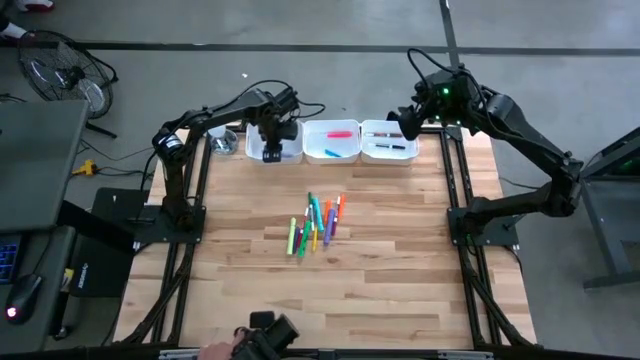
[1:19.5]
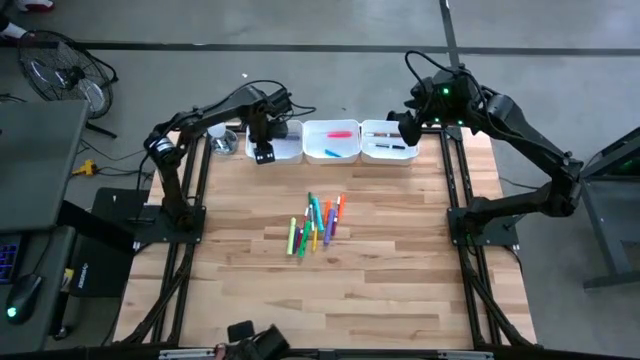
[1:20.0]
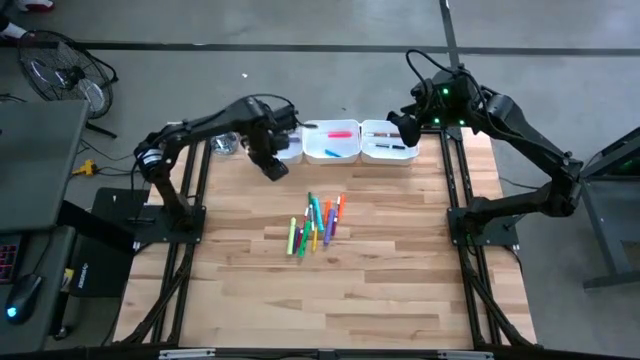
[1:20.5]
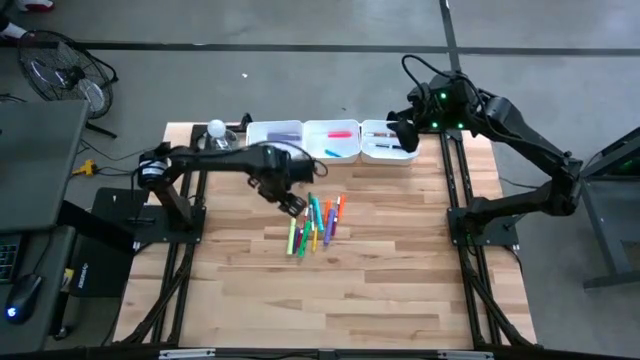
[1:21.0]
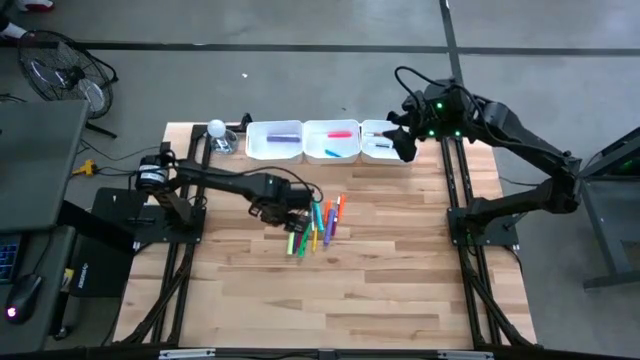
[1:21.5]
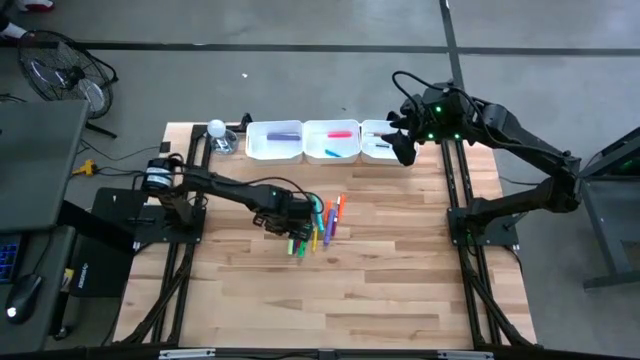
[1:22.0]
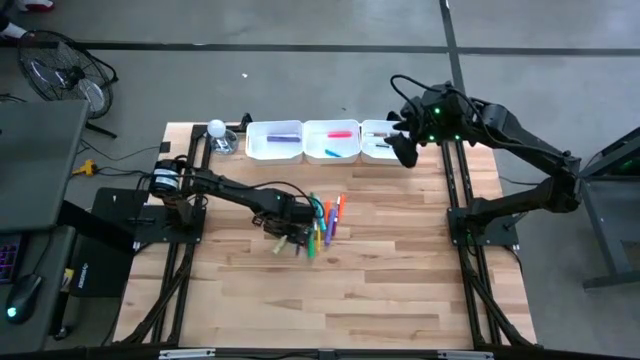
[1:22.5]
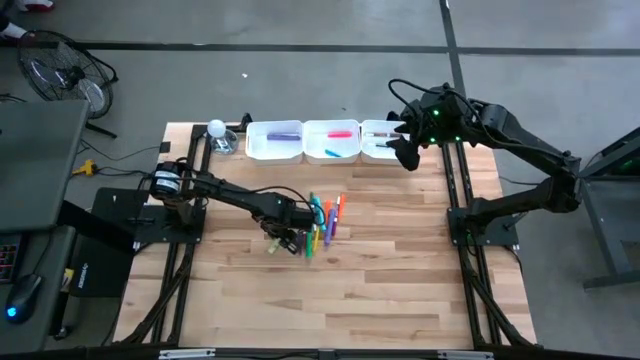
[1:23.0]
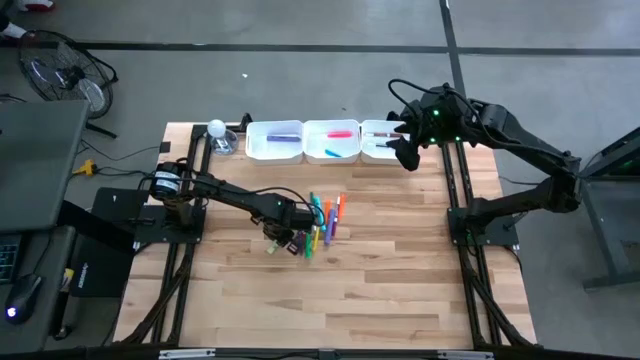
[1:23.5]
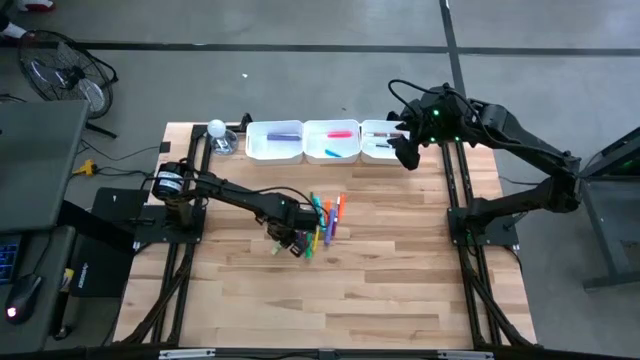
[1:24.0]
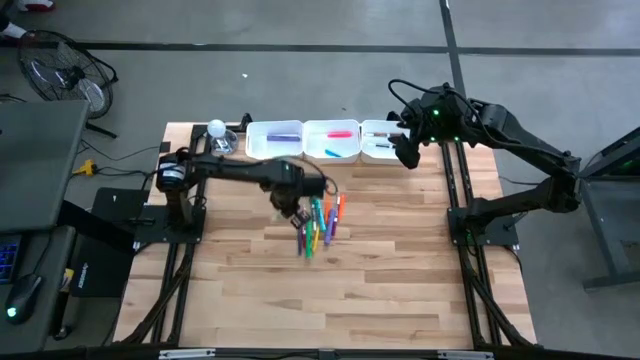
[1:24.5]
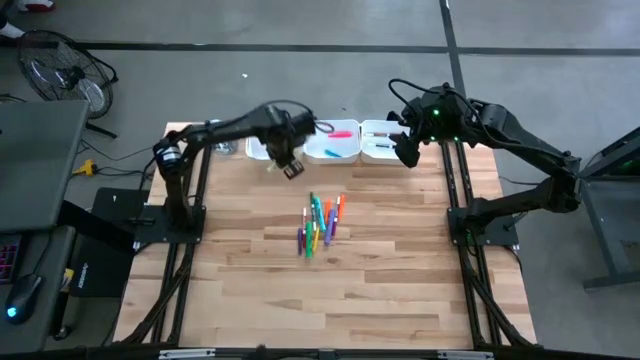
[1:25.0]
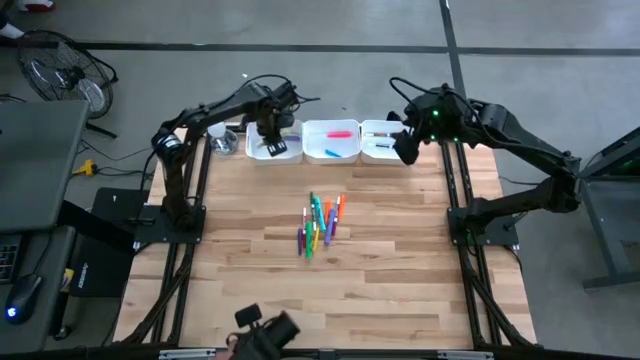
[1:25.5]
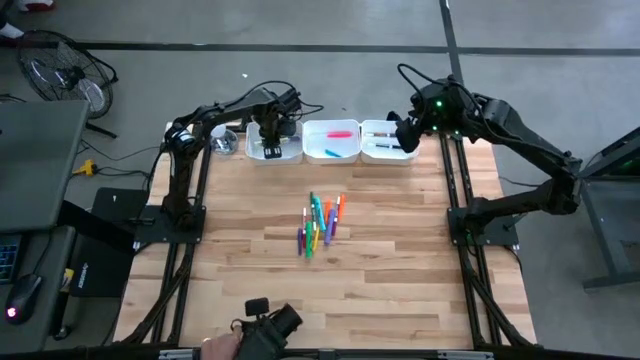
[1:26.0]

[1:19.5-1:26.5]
Task: Pick & Place Markers
Put the light green highlighter pen into the left white bin

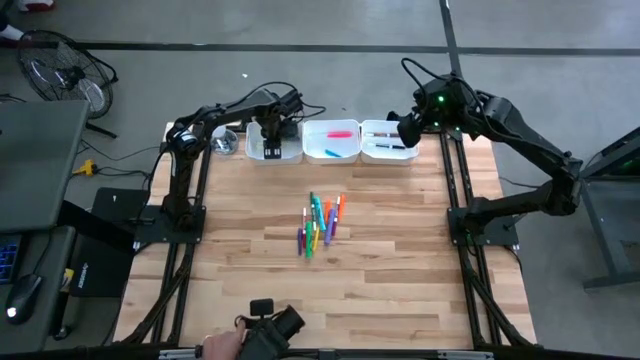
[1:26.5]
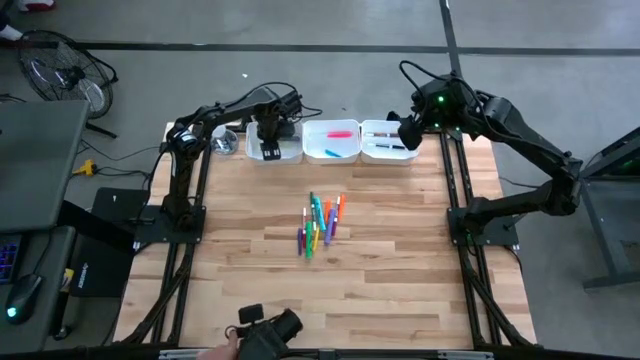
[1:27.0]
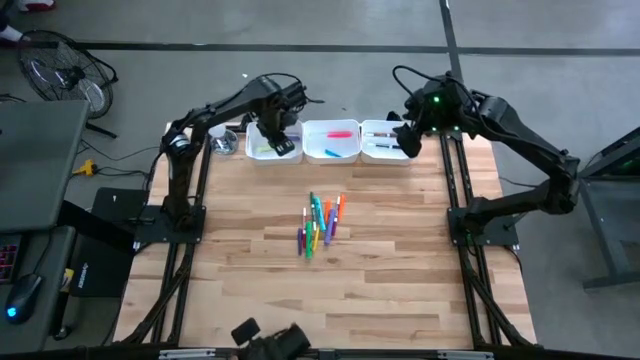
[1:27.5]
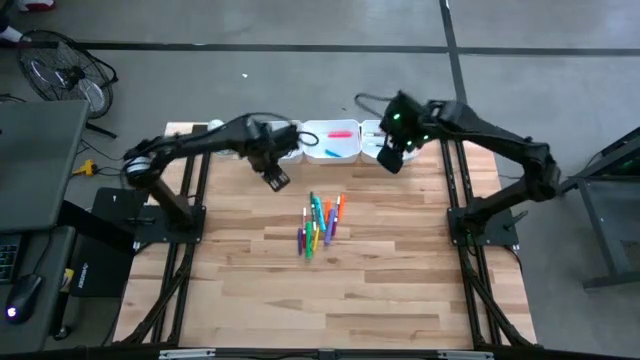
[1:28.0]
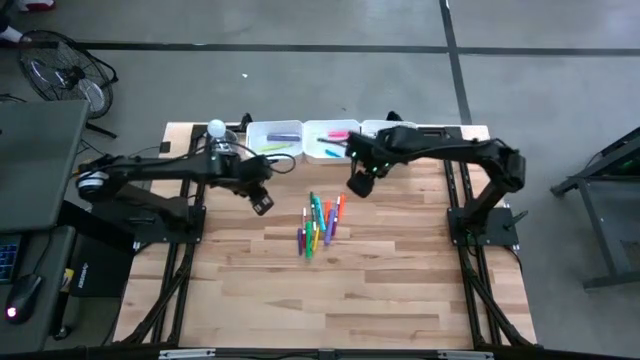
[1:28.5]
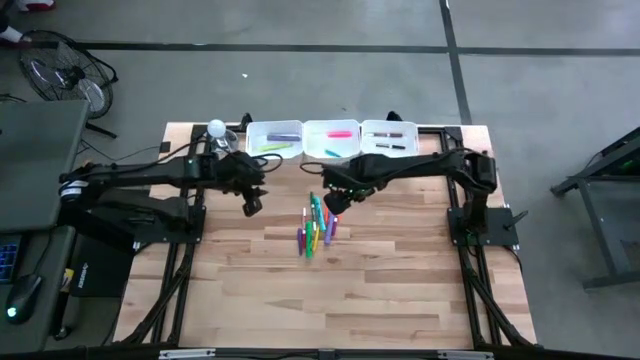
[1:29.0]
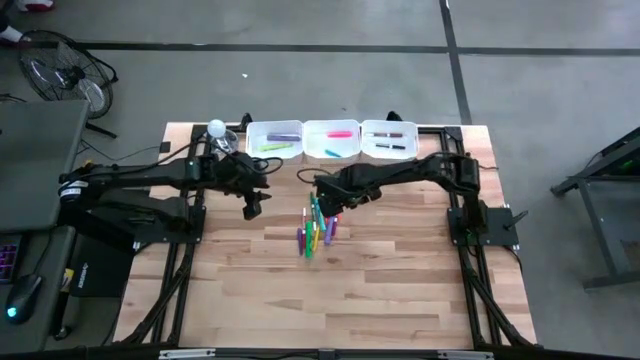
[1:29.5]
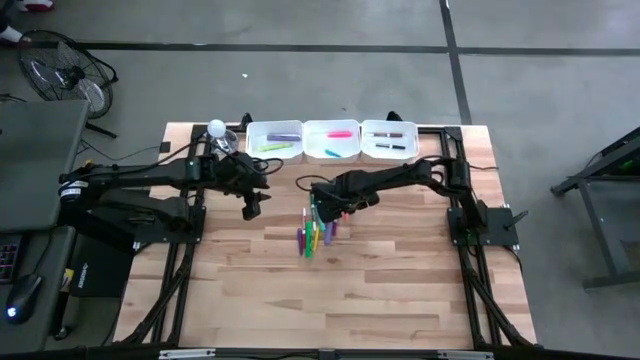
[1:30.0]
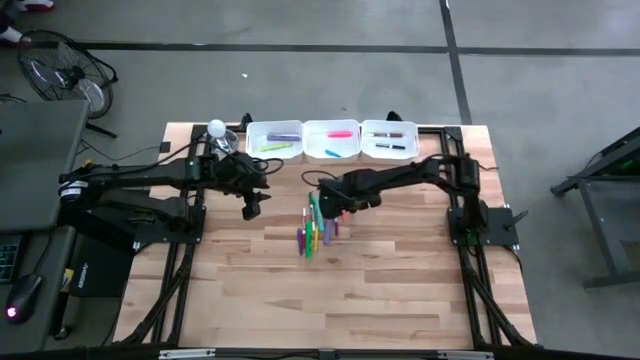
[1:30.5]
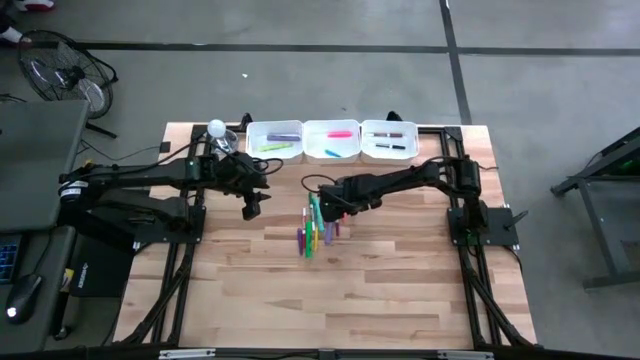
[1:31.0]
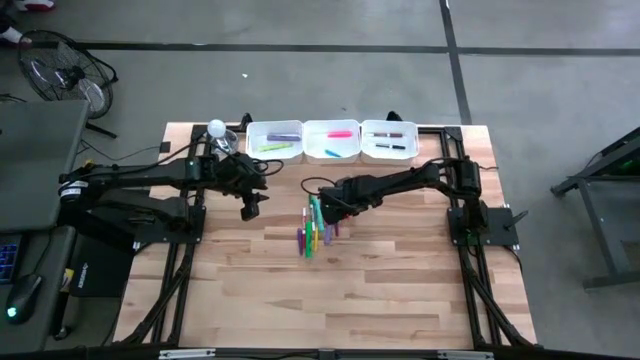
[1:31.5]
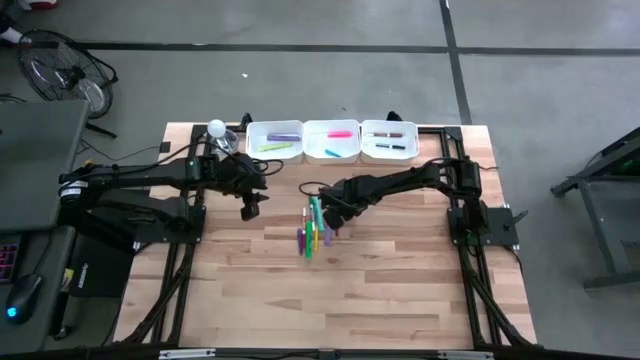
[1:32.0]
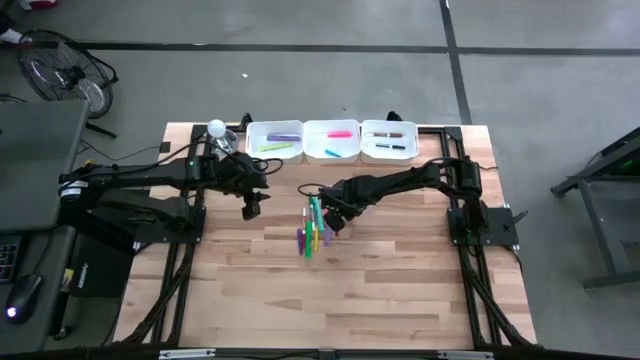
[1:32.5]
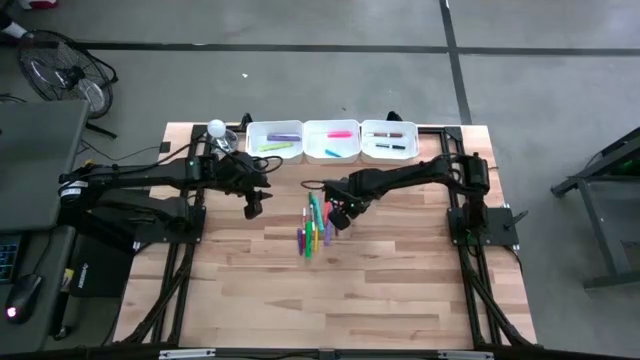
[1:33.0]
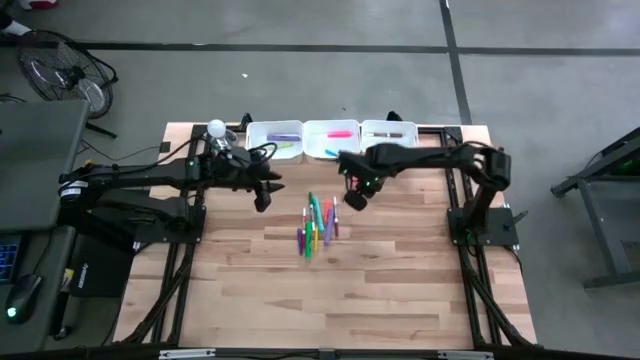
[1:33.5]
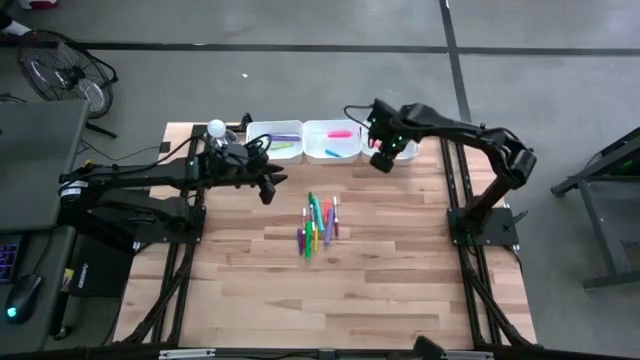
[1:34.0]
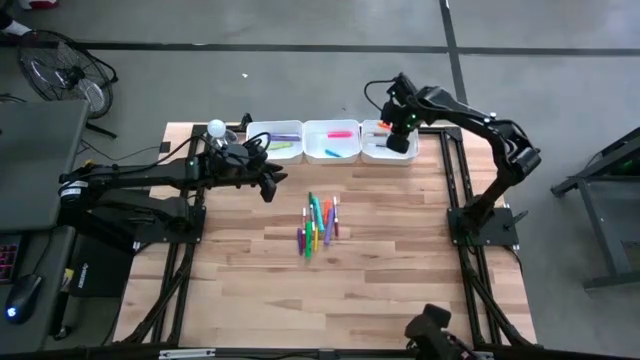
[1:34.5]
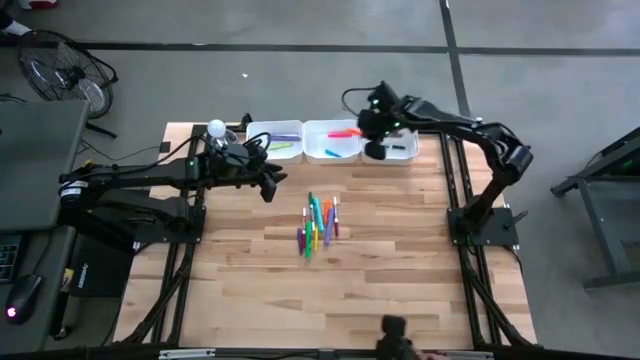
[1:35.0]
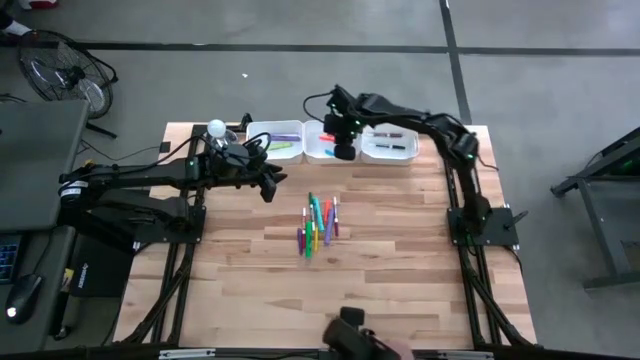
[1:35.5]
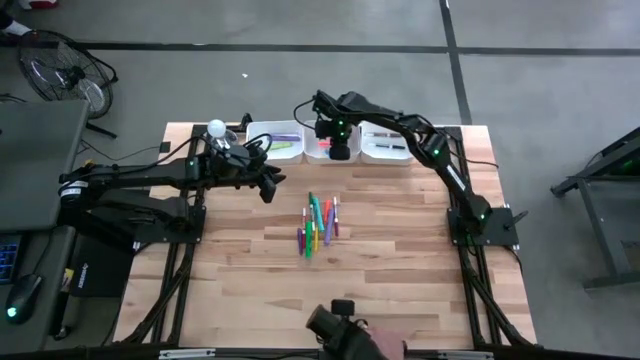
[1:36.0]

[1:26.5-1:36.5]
Put the right orange pen into the middle white bin

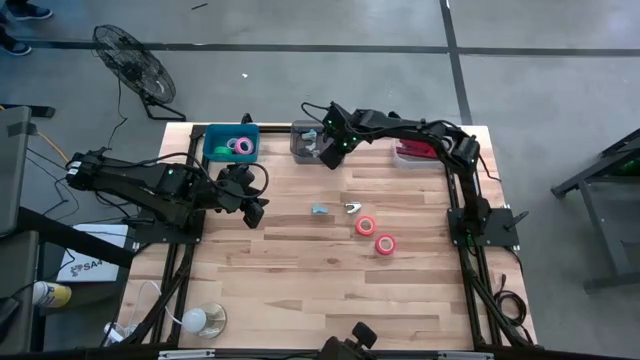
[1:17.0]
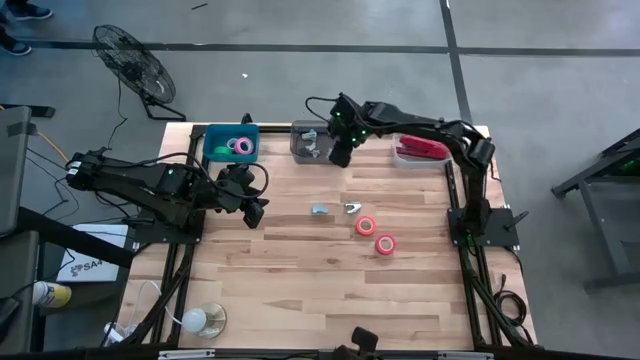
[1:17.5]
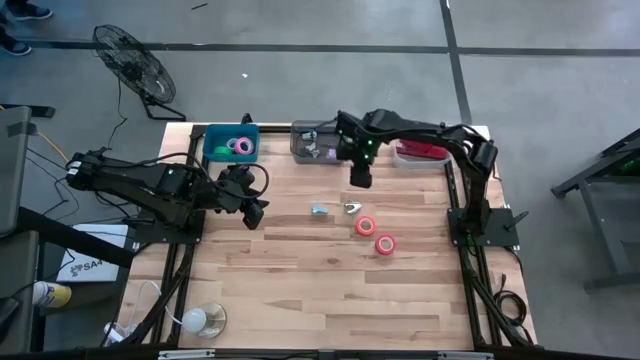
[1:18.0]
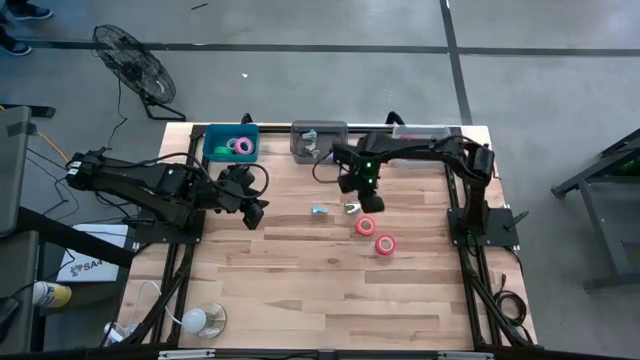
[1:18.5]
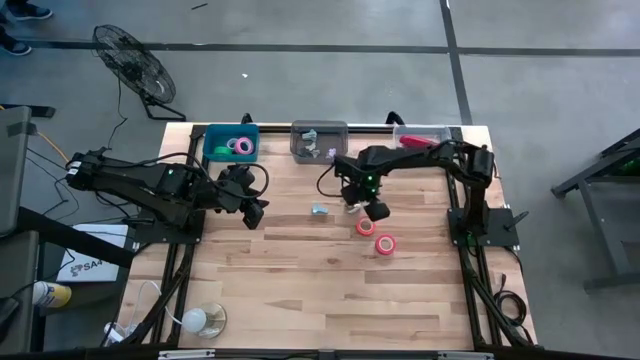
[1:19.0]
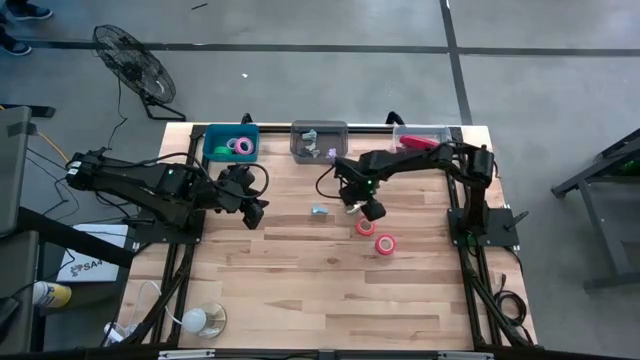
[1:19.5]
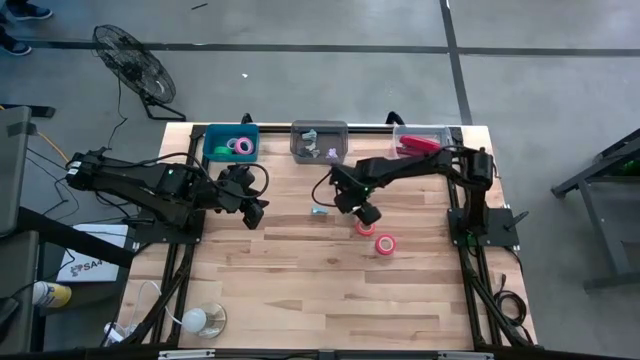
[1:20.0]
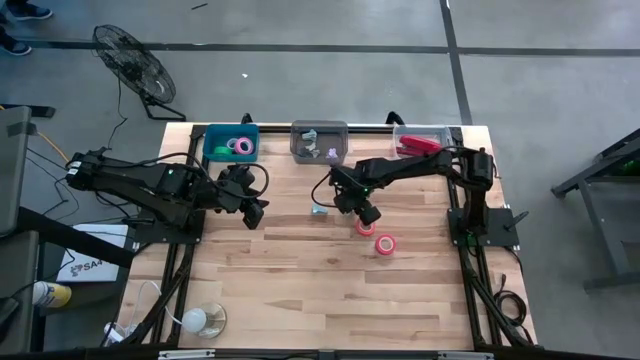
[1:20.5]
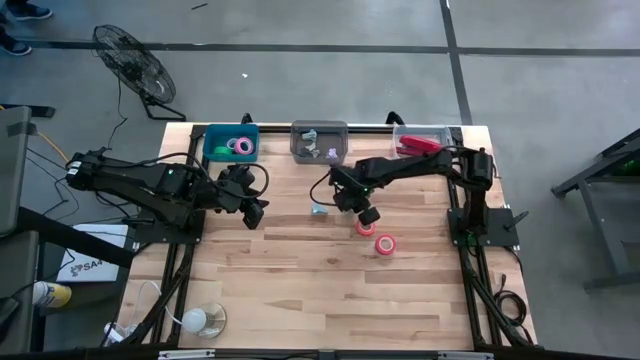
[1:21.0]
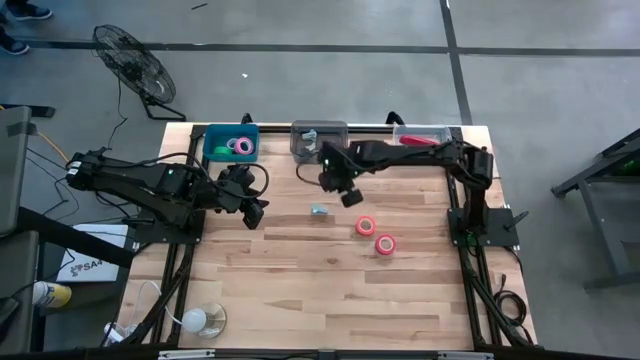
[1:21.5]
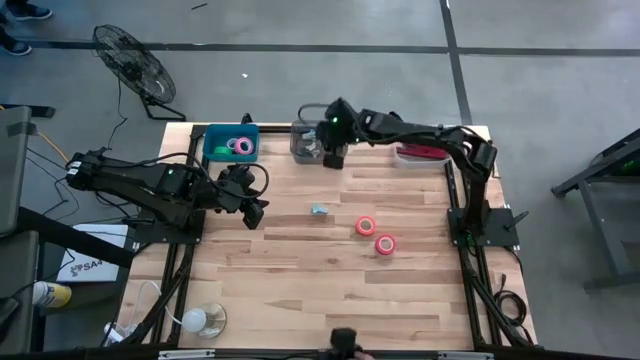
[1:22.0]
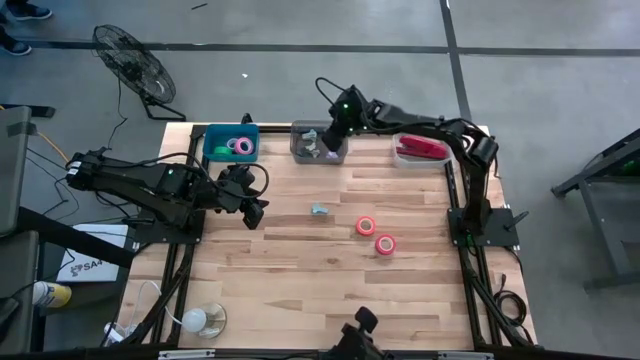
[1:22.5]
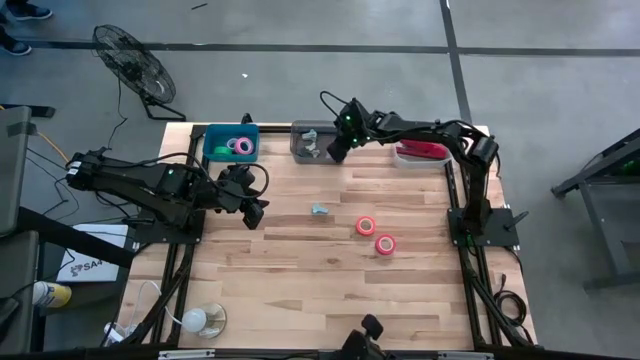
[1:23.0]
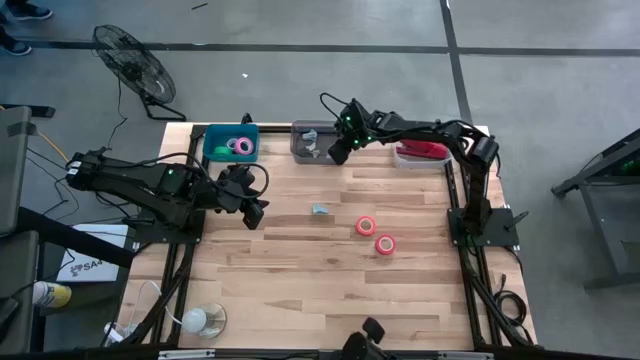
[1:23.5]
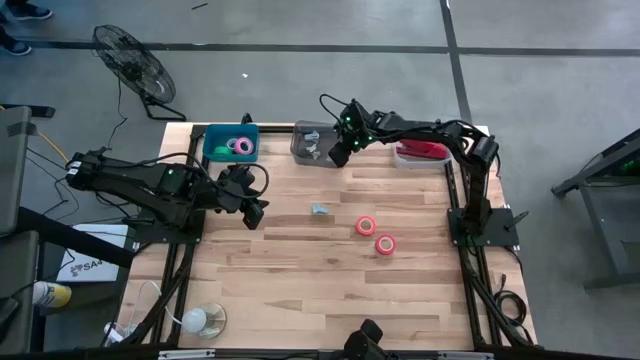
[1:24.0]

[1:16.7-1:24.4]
Task: Pick and place Stapler, Stapler remover, tape
Put the white staple remover into the black bin
